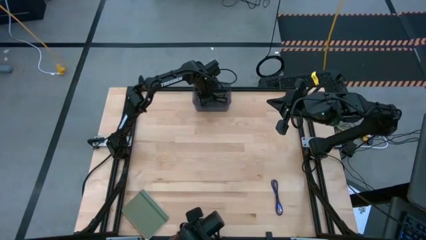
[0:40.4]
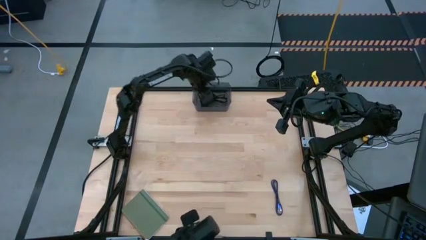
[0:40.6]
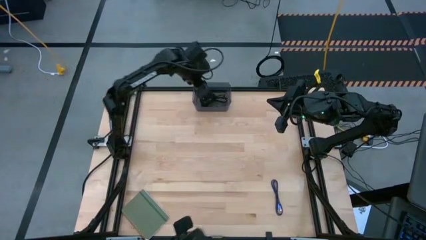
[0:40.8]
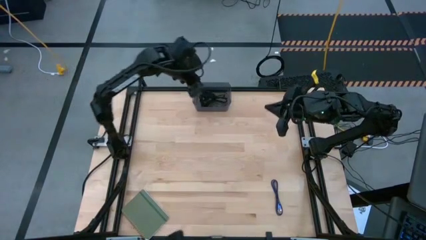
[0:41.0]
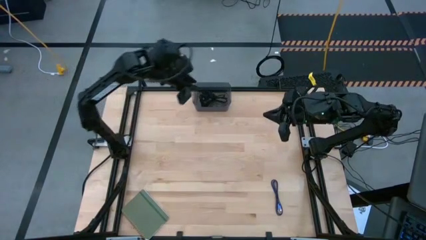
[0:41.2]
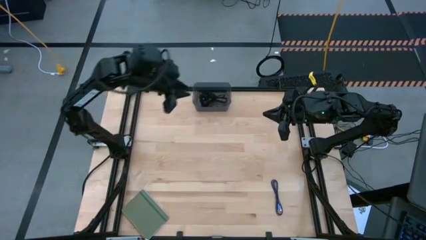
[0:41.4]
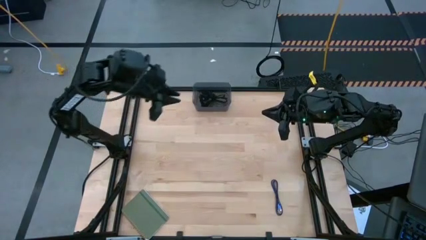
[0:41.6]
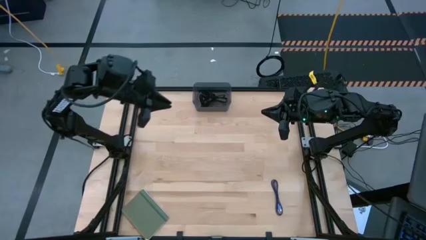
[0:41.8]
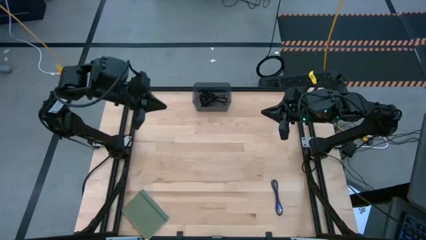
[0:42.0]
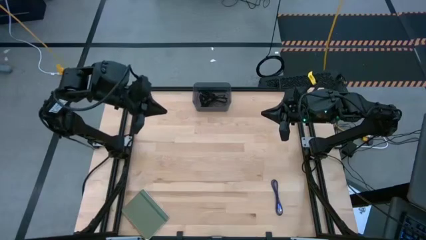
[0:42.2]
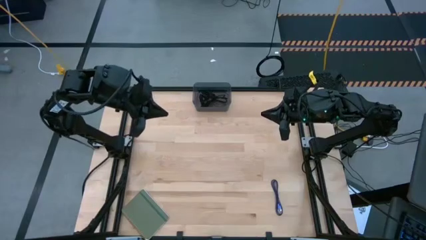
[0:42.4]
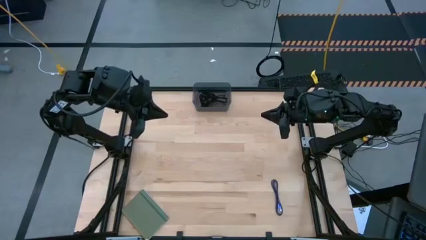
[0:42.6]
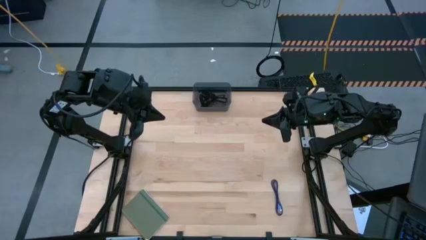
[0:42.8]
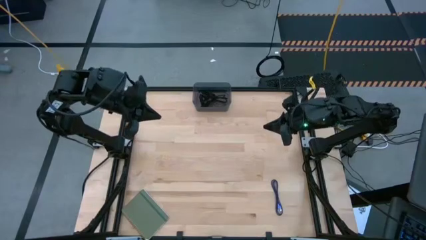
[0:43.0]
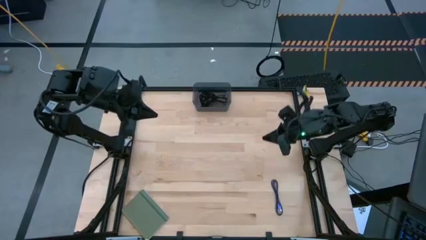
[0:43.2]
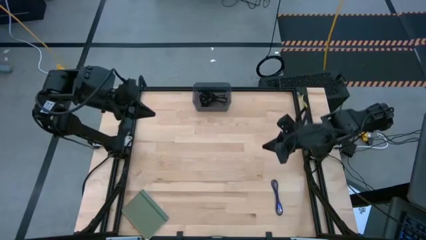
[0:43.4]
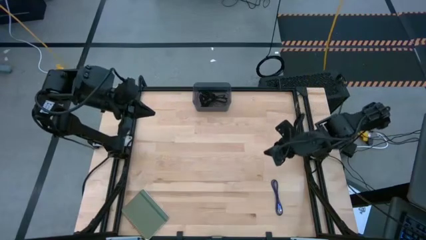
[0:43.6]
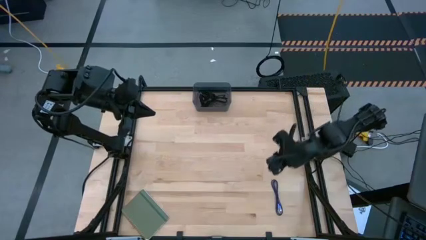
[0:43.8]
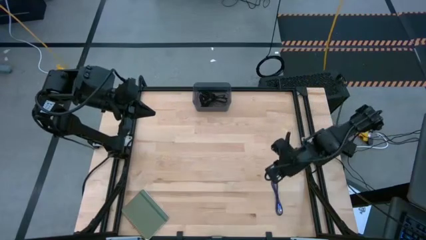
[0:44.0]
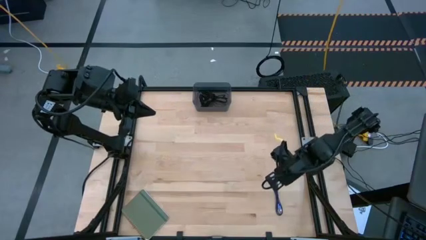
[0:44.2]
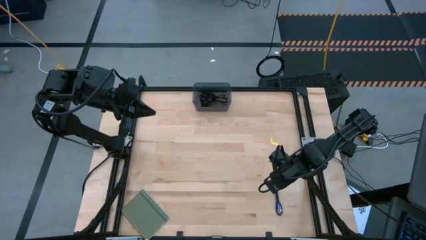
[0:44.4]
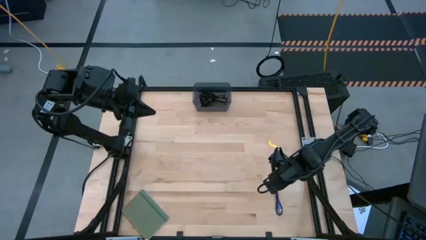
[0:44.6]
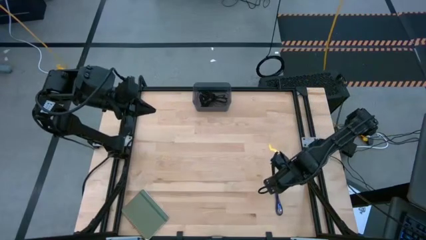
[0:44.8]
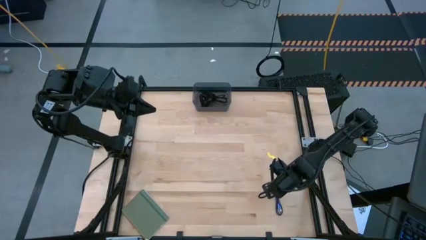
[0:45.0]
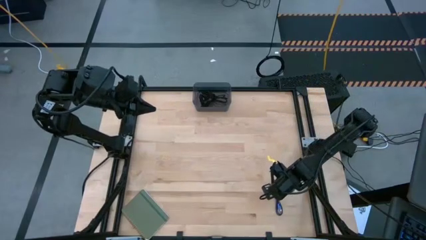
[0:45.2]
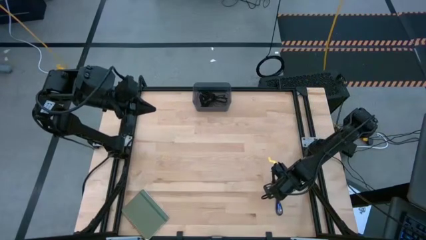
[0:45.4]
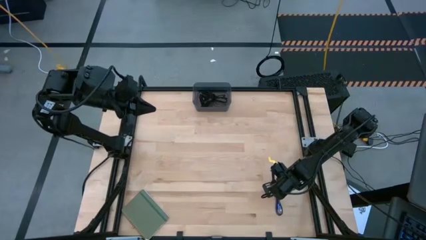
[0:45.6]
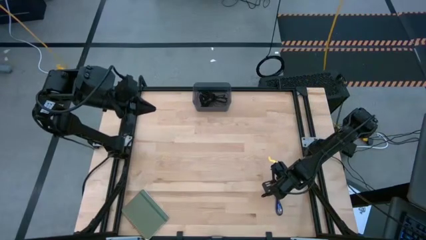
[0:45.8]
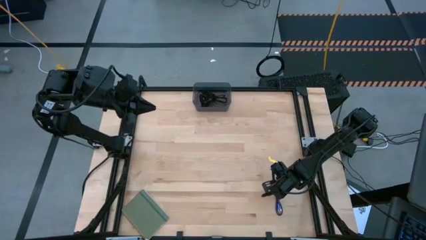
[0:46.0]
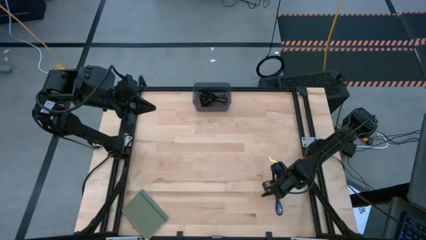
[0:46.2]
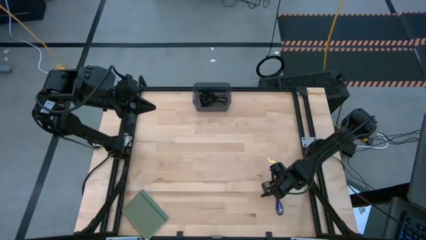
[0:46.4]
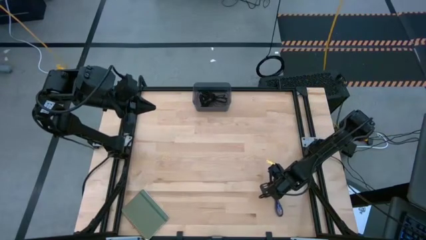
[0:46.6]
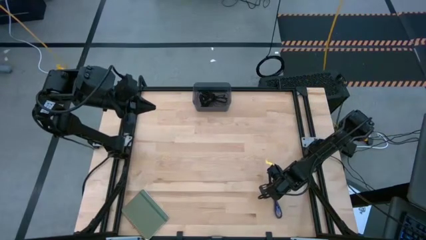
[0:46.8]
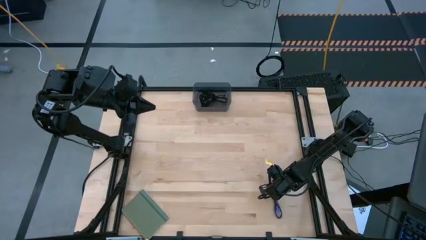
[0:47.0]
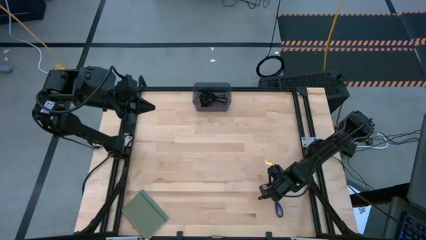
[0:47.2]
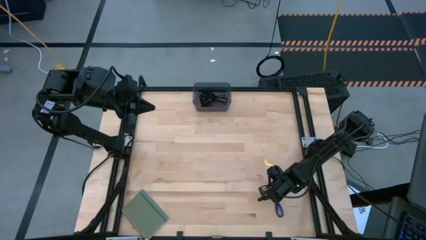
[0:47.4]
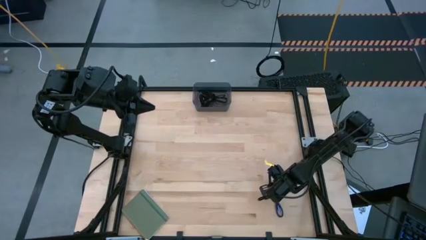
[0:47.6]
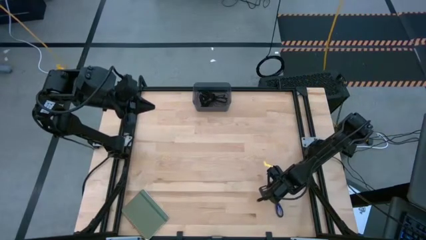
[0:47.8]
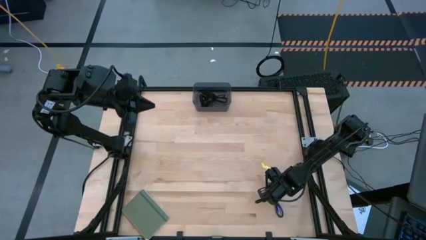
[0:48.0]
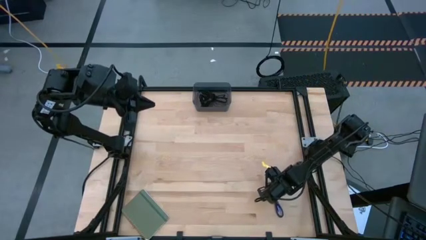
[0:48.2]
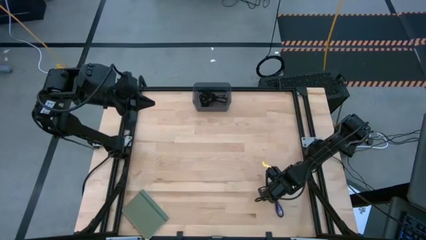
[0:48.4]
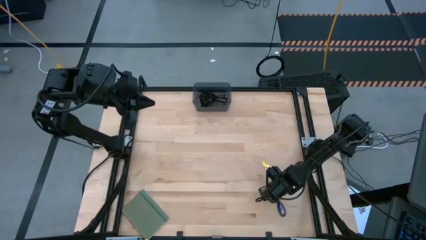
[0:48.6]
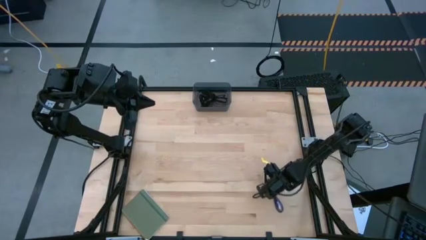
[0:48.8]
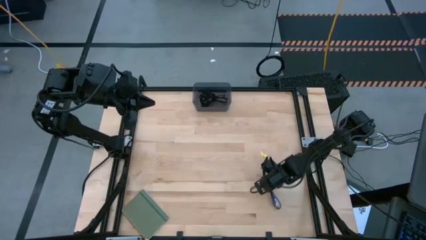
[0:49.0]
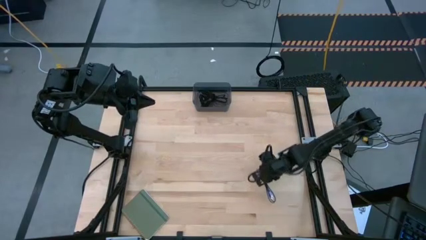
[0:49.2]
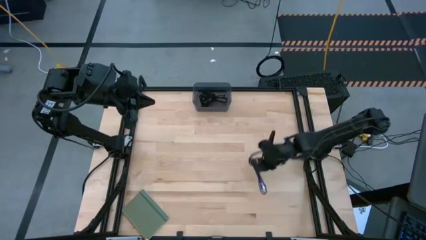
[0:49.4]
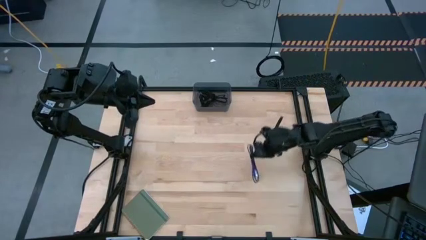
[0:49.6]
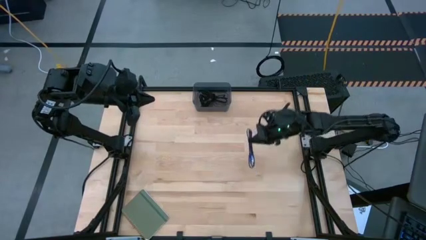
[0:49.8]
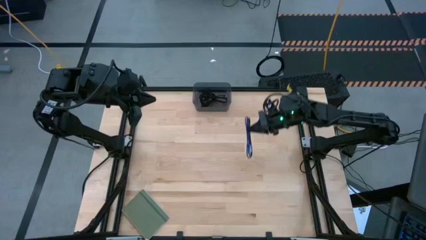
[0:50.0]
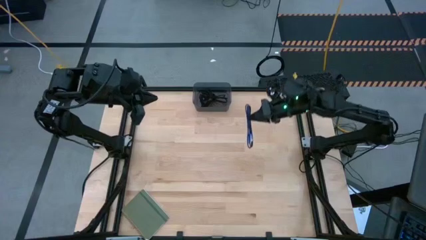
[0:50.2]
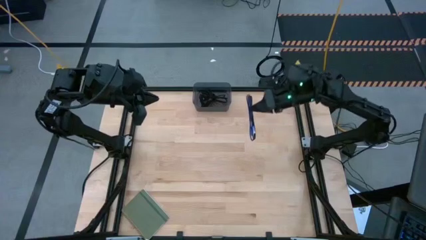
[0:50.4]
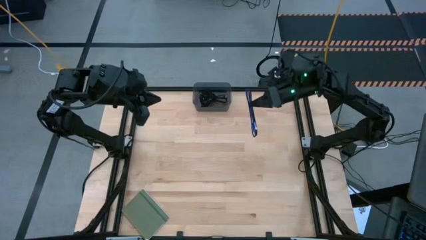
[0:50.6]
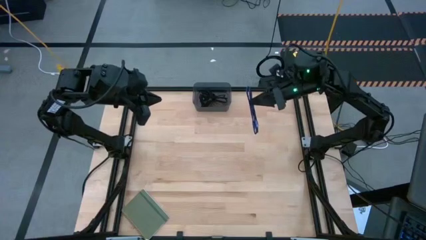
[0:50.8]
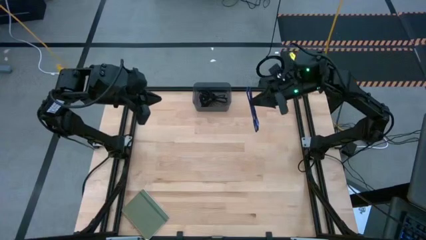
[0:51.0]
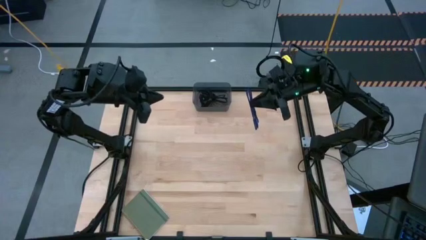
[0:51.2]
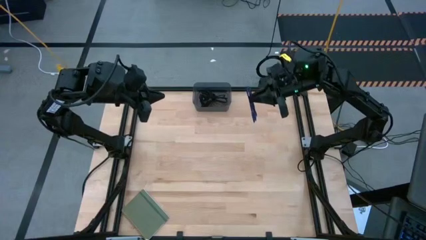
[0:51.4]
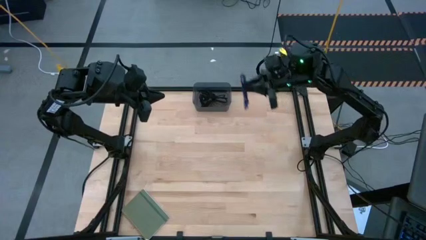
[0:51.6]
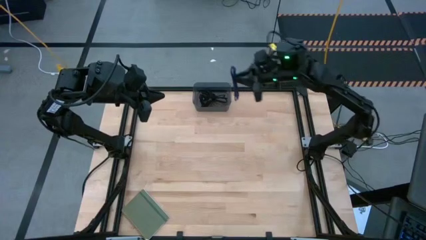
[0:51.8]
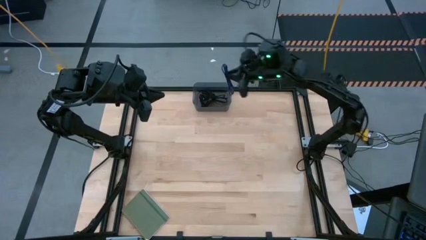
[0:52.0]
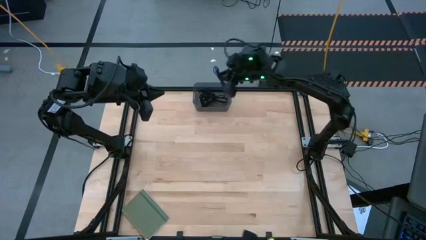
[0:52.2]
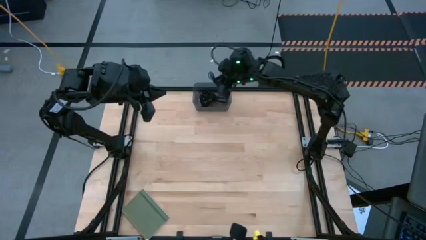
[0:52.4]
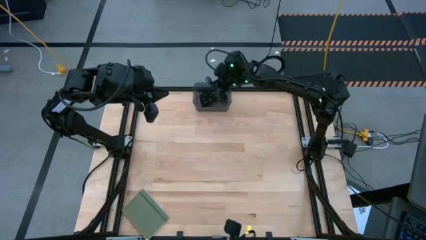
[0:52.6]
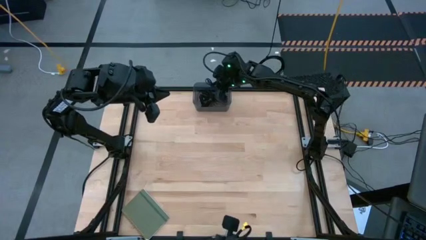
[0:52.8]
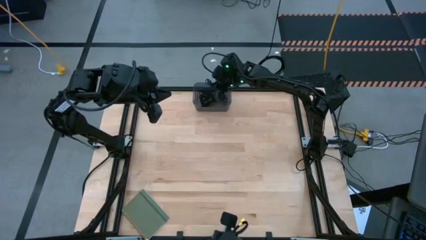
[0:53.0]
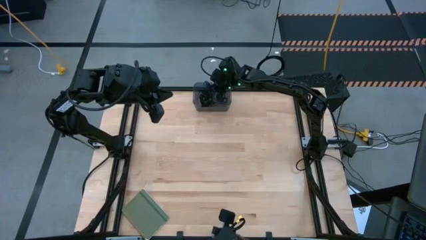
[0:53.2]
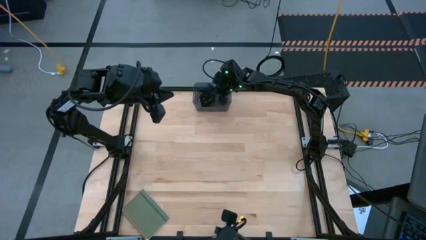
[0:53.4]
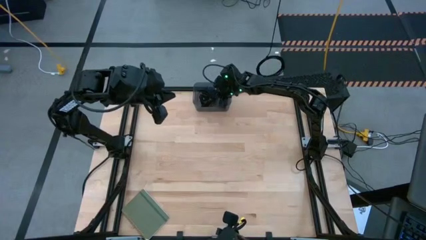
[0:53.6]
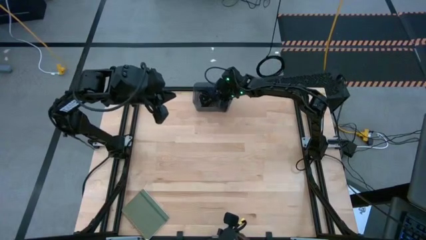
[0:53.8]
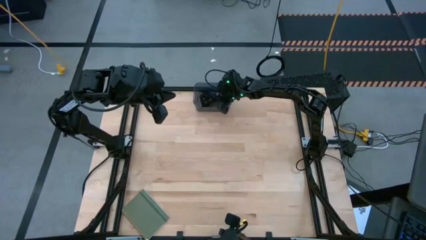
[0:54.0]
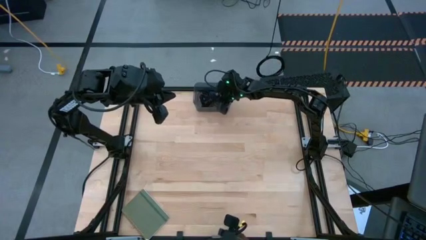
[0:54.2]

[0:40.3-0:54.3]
Task: Pick and place USB-C Cables
Put the blue USB cable into the black bin

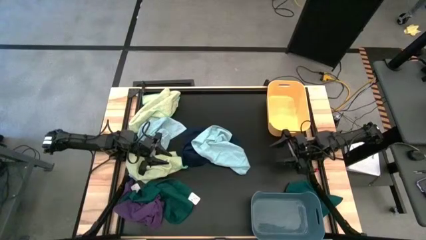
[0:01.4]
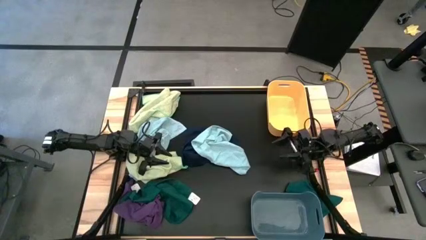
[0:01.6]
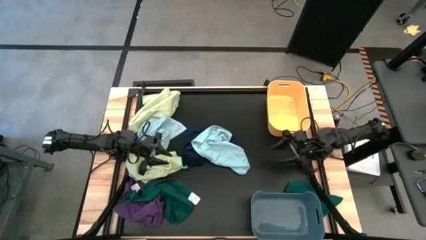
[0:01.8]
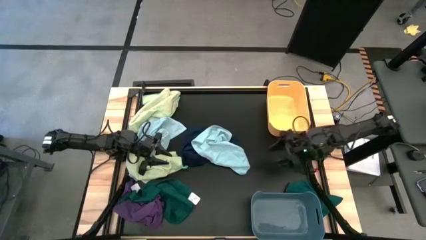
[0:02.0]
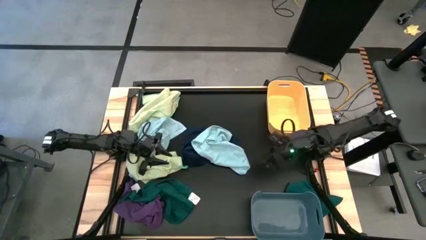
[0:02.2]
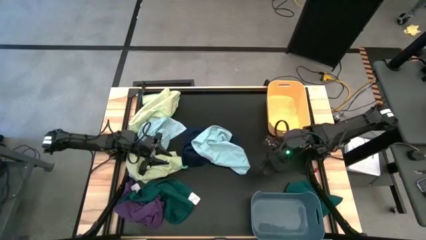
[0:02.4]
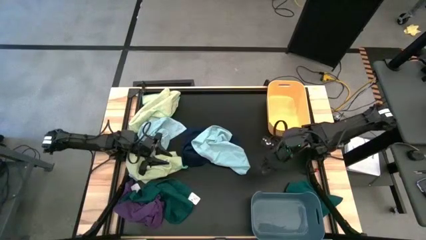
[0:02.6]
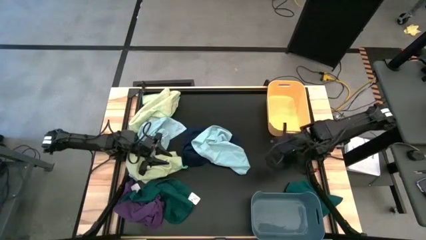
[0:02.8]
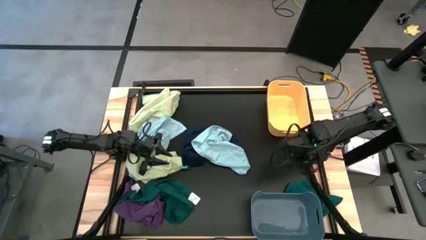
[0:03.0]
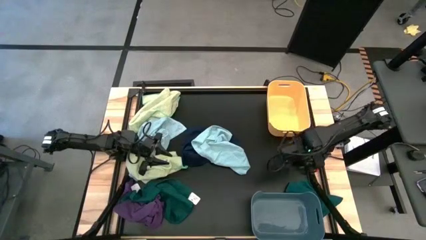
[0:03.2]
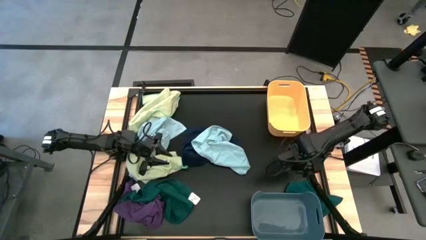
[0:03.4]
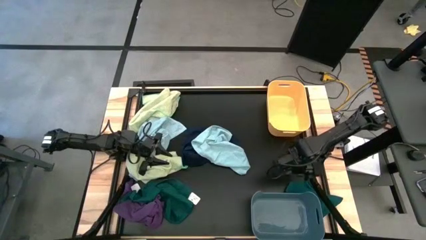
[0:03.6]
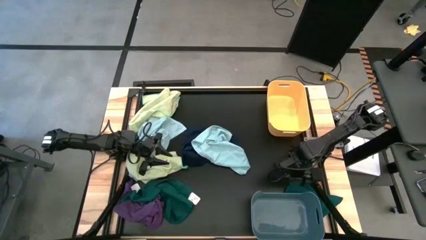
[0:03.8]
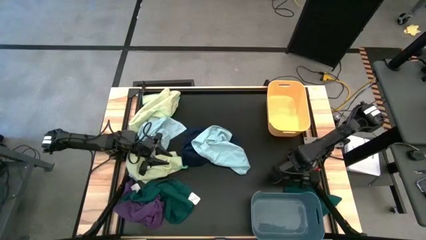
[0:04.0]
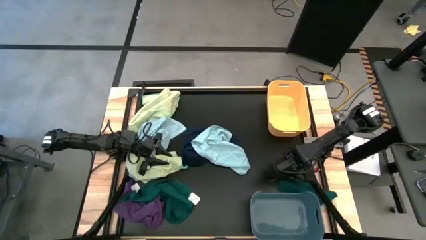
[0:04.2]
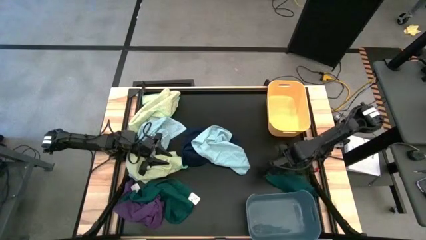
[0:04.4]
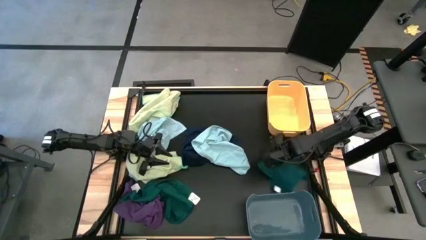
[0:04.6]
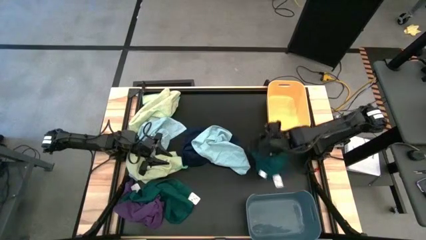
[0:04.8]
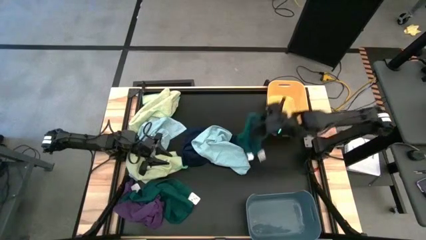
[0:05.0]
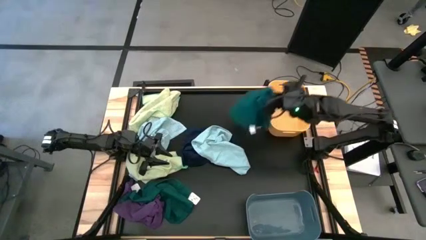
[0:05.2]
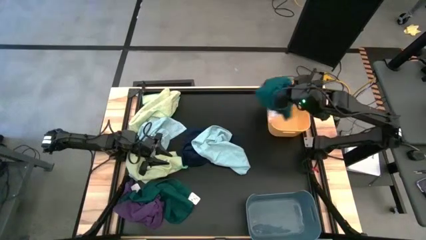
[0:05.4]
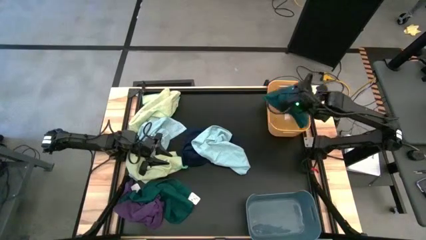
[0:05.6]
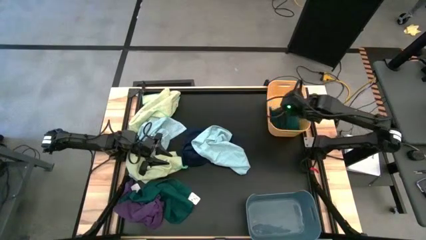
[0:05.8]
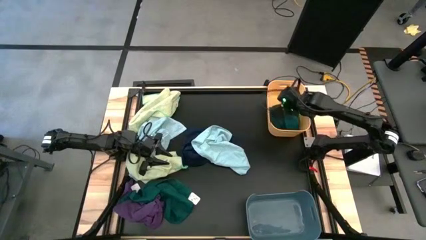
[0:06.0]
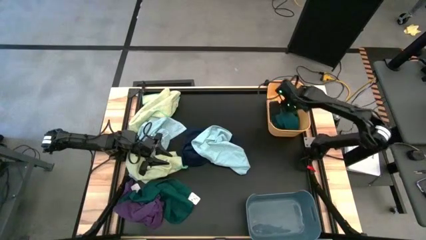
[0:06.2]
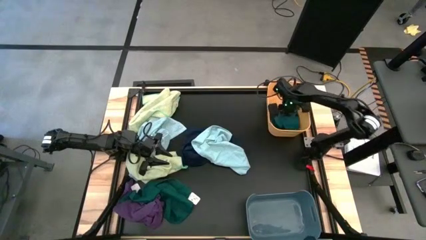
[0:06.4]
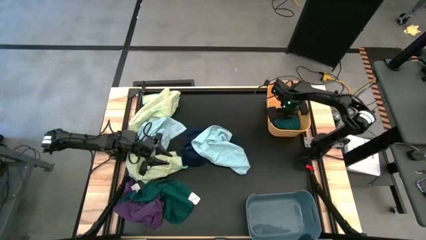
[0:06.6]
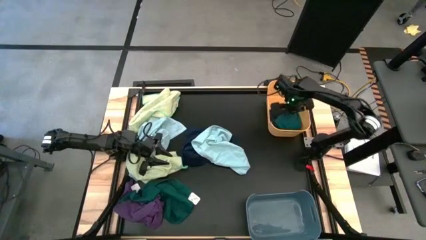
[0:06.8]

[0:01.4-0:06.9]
Task: Sort towels by color in basket
Put the dark green towel into the yellow bin
